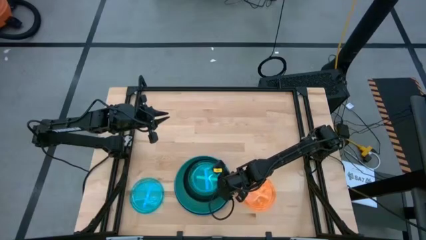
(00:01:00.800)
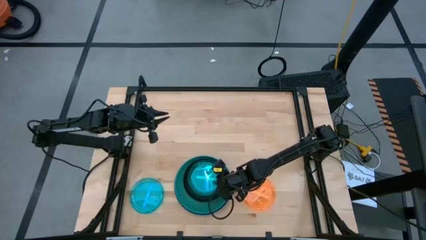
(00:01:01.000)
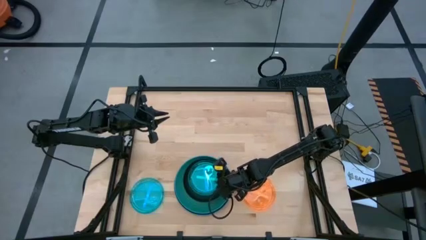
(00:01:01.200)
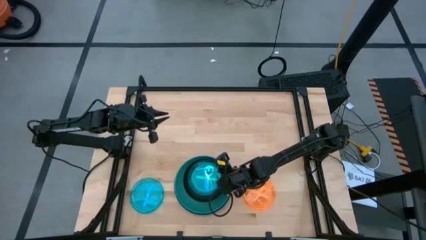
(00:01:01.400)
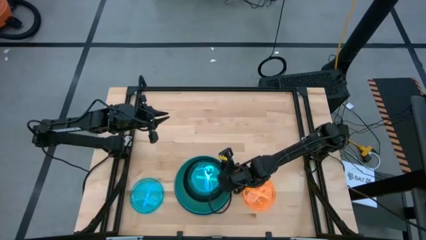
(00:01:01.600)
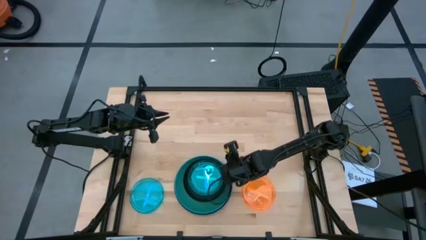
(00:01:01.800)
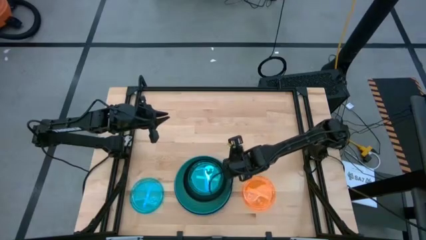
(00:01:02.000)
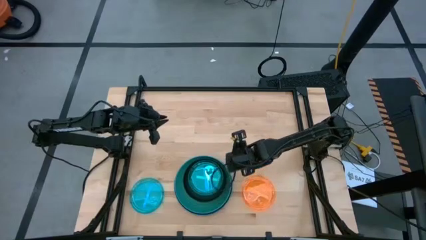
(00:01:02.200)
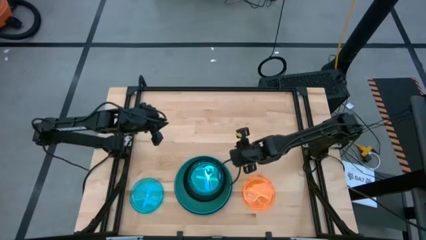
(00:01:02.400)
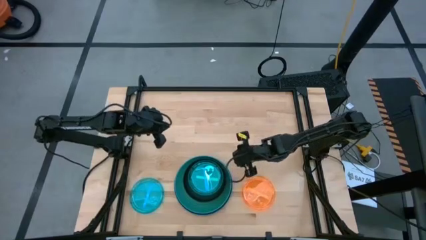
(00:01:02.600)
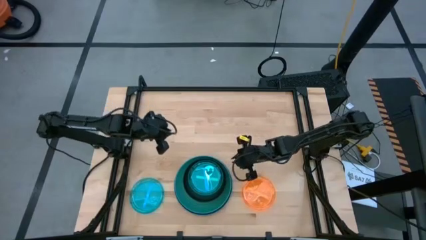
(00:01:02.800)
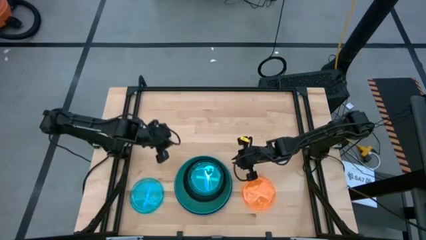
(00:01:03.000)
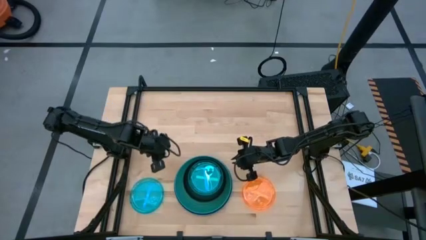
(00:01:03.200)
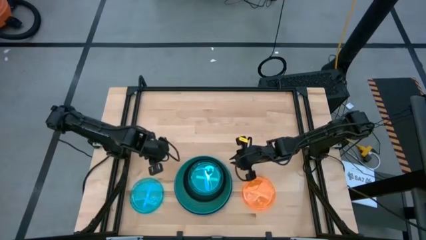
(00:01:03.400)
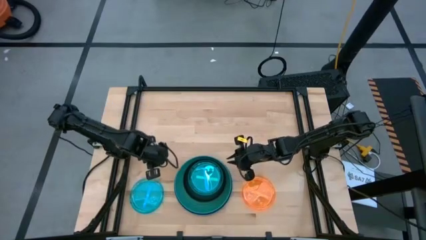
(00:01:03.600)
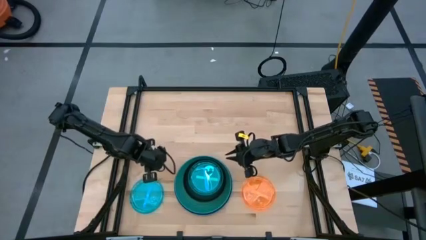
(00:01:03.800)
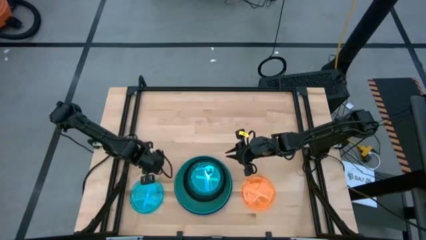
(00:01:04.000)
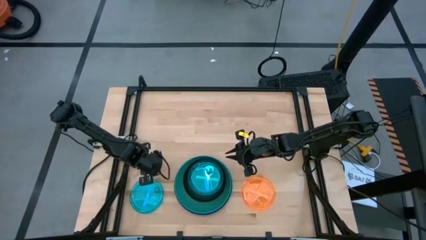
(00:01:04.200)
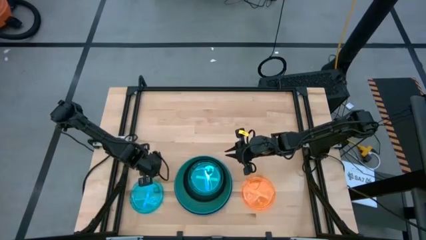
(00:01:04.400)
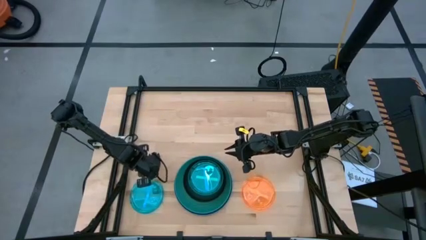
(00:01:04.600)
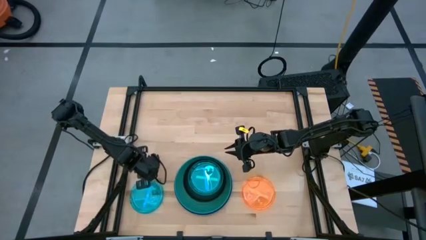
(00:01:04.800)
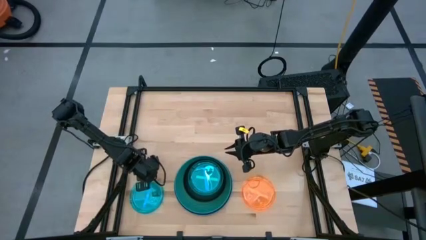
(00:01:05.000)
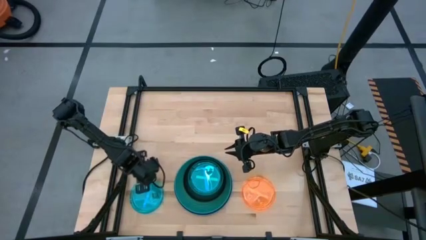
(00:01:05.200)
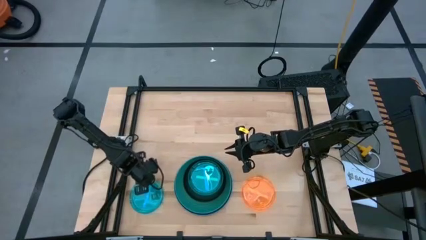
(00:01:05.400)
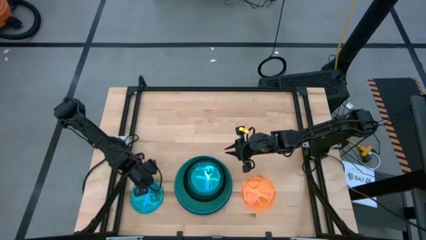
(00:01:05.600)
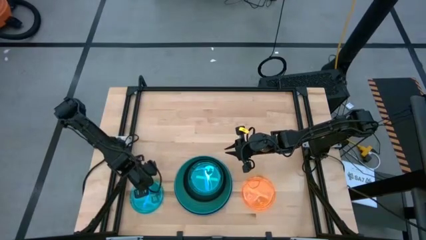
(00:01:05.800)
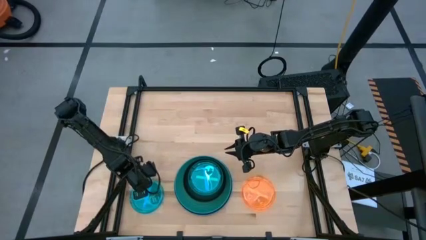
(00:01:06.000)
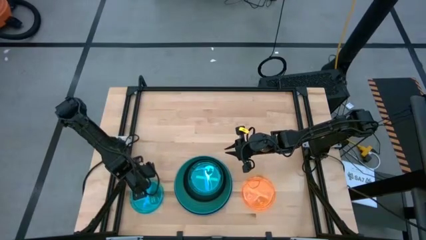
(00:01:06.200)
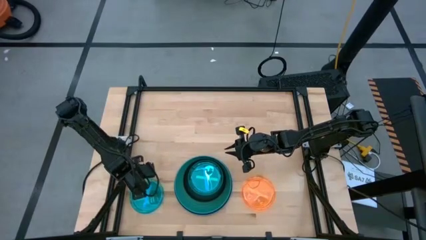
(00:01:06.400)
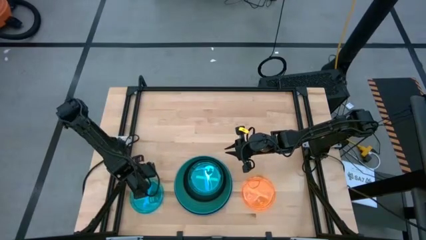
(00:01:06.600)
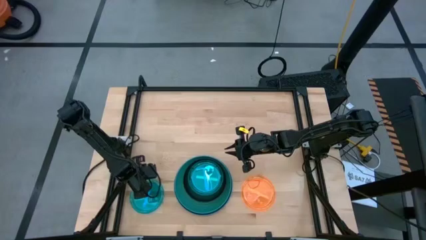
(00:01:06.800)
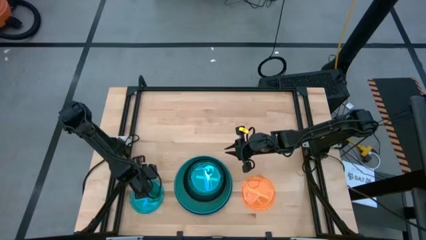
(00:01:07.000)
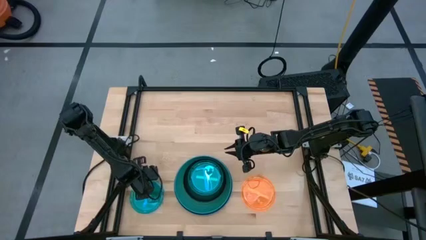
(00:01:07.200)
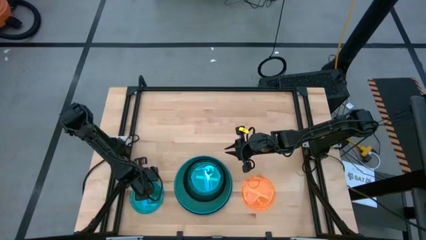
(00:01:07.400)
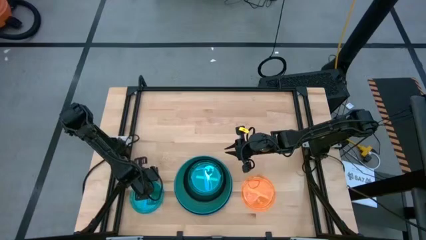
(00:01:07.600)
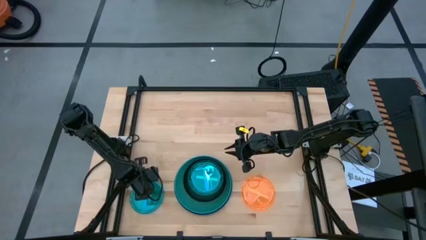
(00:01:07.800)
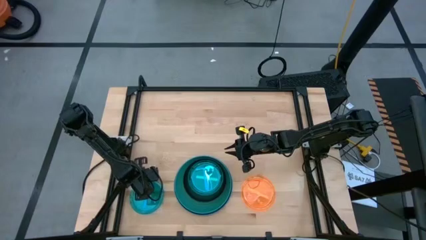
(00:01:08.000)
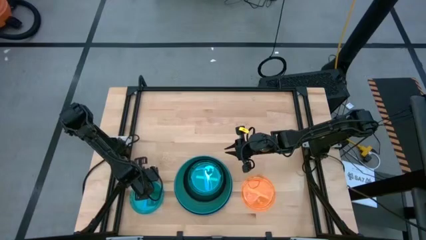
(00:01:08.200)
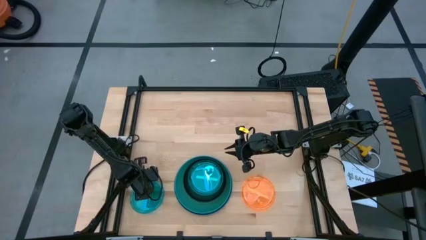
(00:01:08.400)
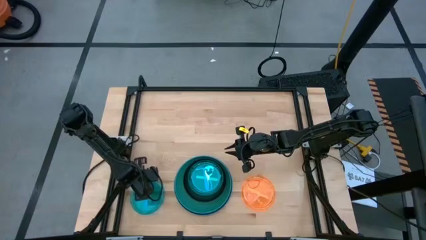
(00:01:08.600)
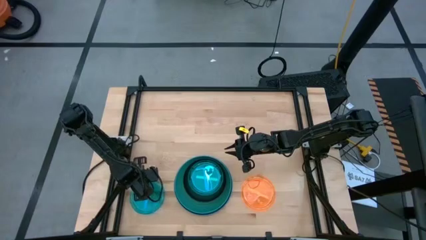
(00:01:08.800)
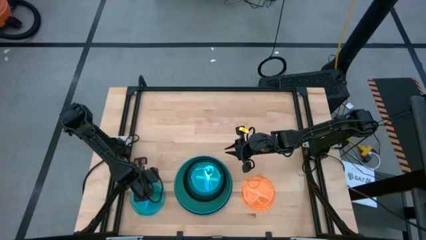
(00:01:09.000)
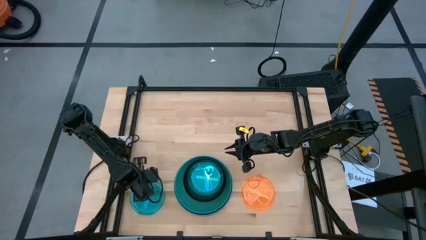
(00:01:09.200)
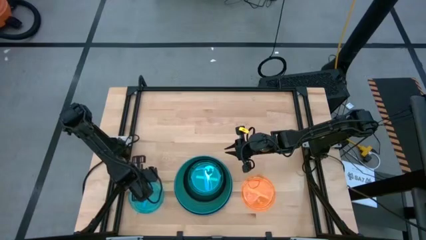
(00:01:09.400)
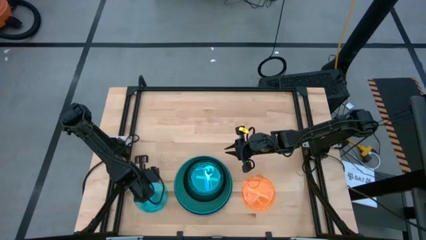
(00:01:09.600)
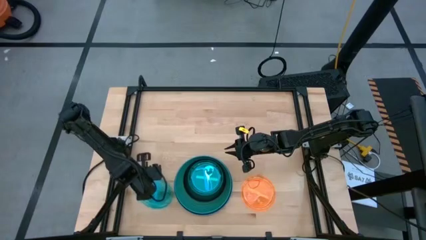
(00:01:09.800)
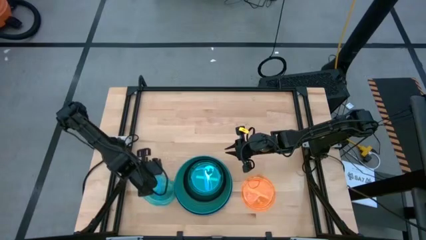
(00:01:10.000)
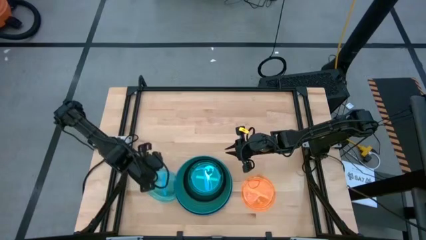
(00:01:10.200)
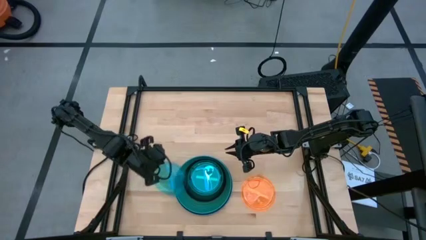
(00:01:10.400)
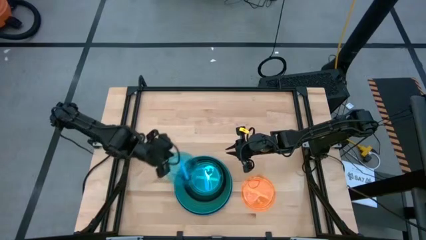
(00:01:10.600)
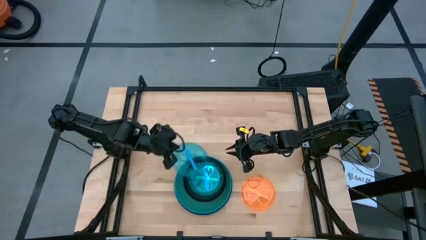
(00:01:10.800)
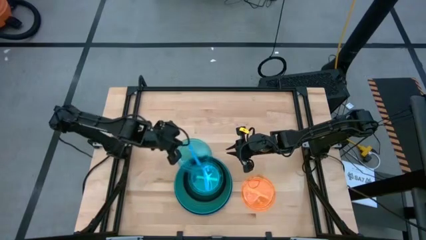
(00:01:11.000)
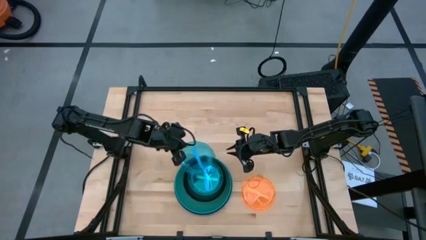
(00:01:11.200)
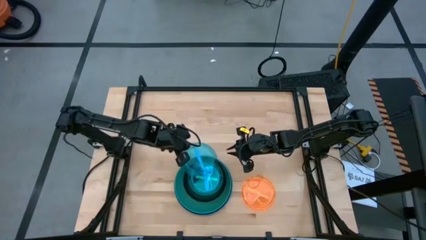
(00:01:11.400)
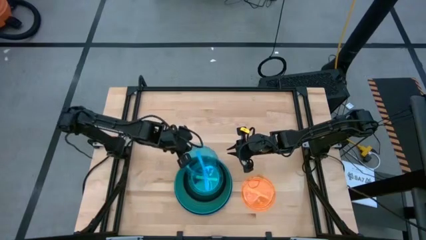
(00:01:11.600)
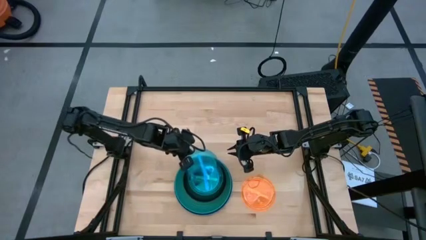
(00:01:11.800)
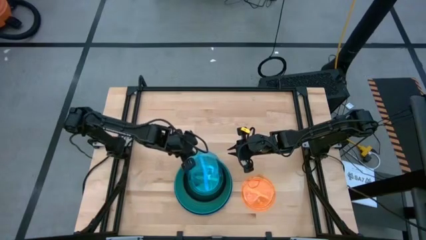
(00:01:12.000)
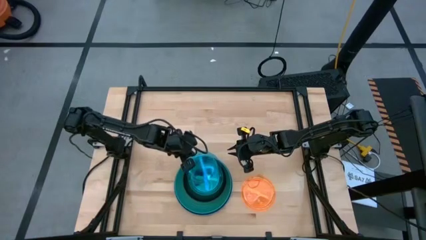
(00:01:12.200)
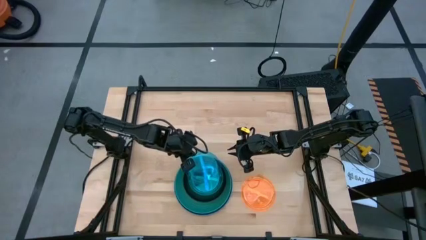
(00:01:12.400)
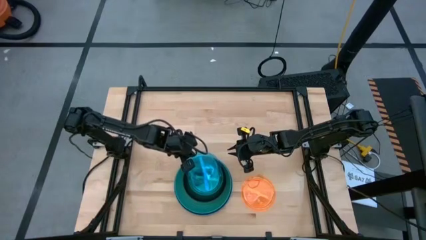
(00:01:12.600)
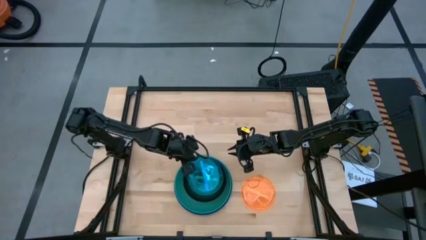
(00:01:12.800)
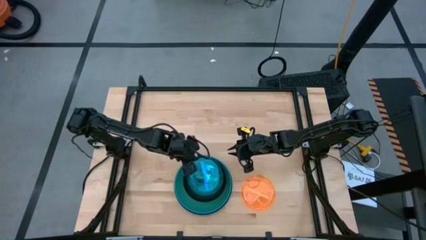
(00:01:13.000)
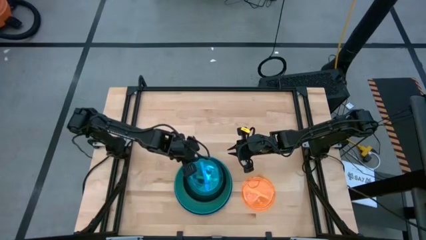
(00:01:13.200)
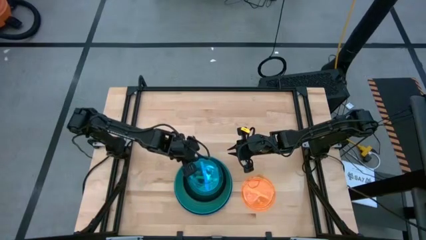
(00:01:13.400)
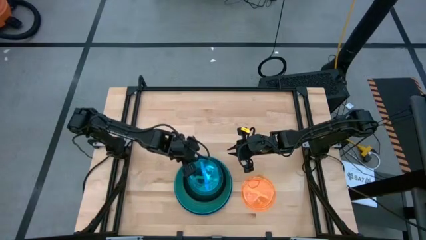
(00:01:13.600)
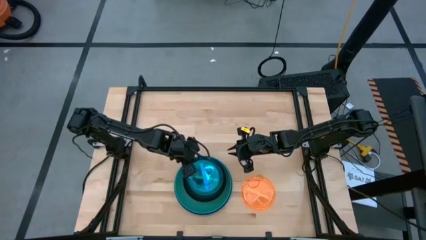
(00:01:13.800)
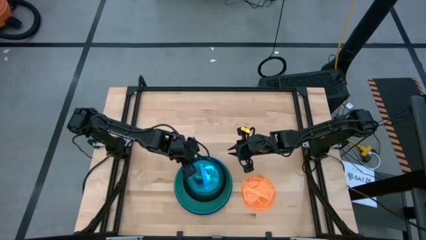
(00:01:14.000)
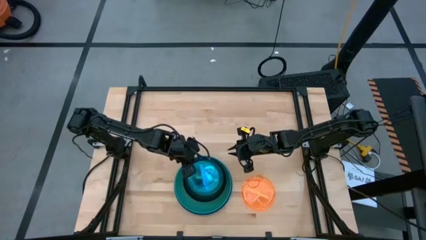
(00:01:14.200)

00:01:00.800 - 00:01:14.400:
Task: Stack plastic plates
Stack the light blue plate on top of the light blue plate
